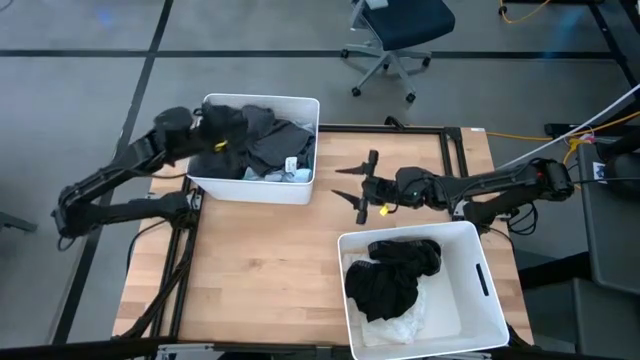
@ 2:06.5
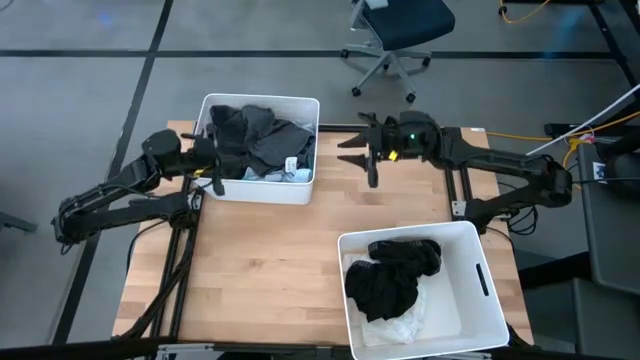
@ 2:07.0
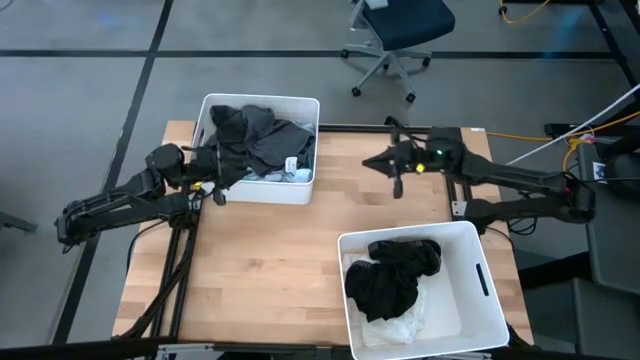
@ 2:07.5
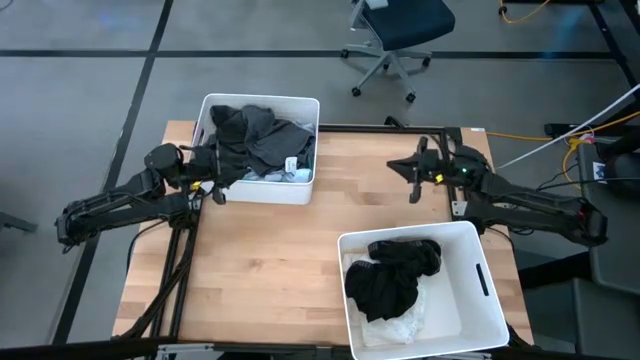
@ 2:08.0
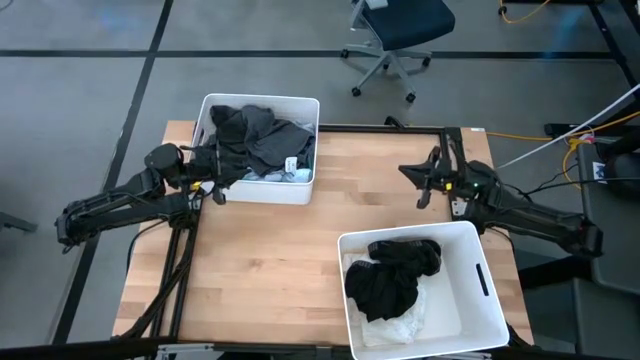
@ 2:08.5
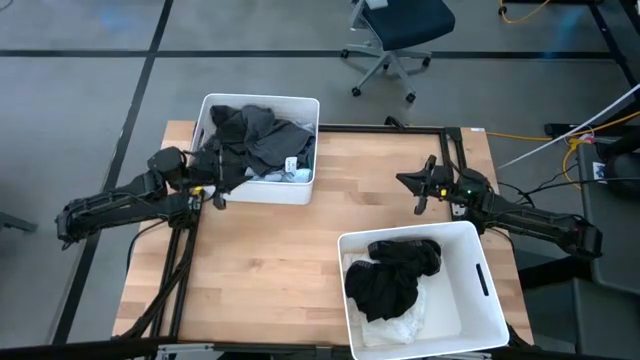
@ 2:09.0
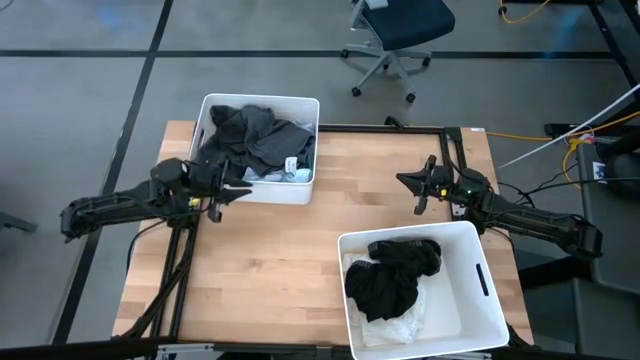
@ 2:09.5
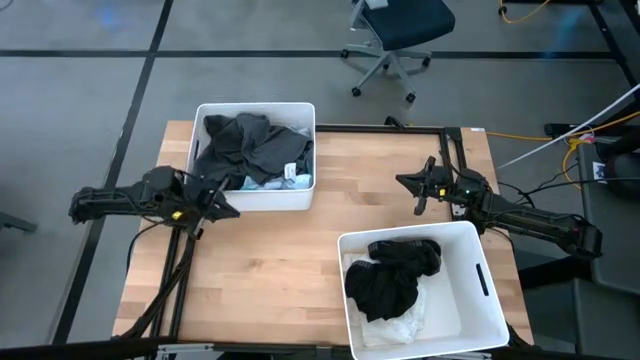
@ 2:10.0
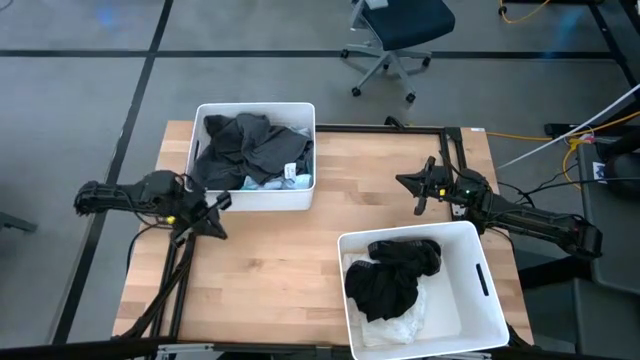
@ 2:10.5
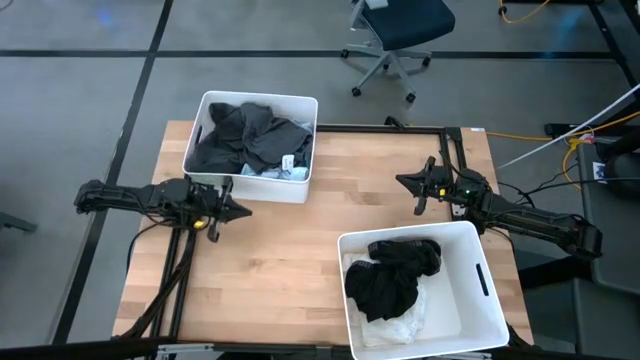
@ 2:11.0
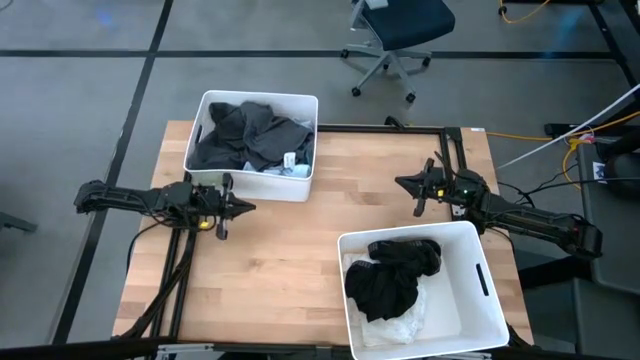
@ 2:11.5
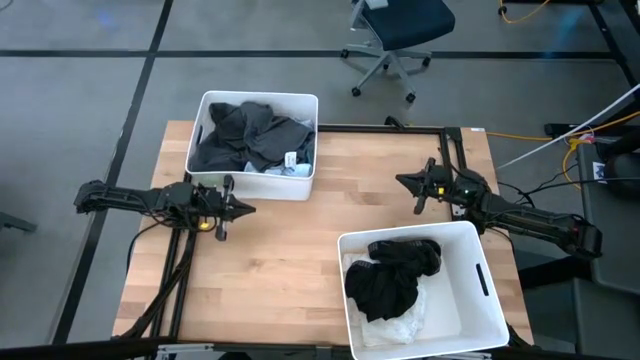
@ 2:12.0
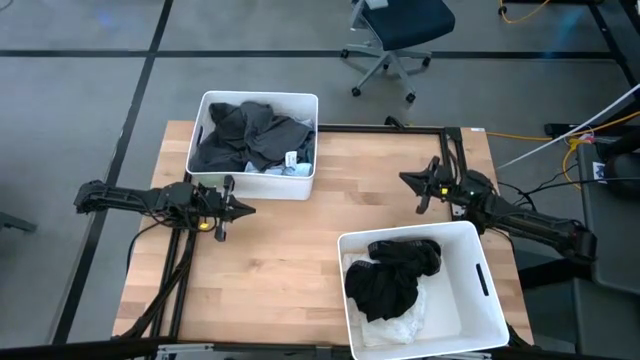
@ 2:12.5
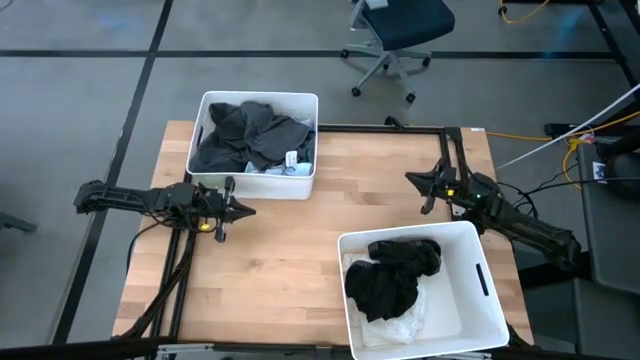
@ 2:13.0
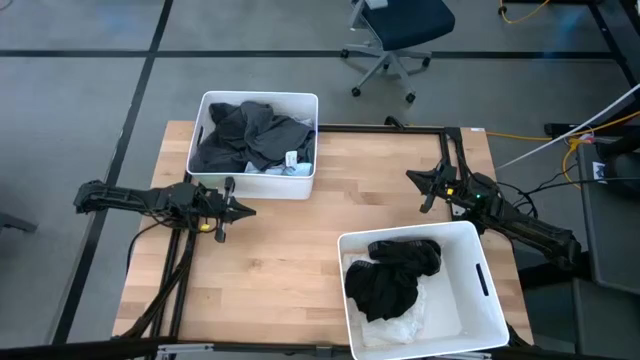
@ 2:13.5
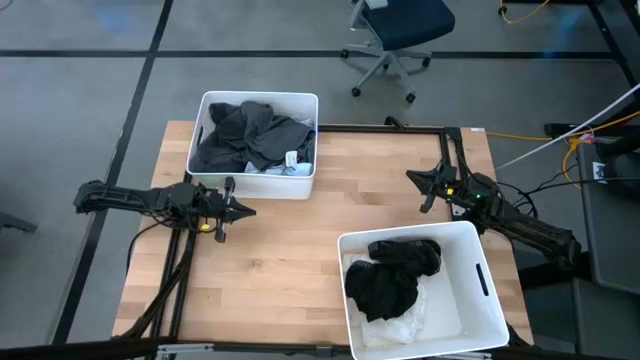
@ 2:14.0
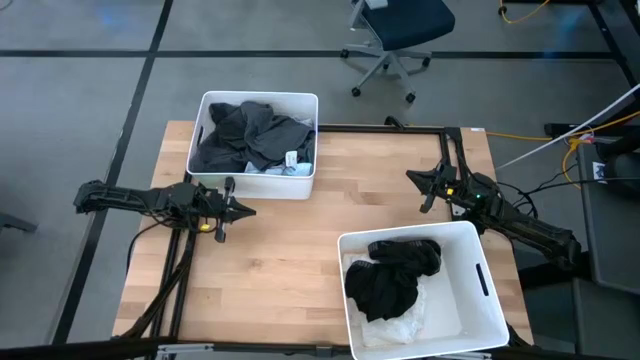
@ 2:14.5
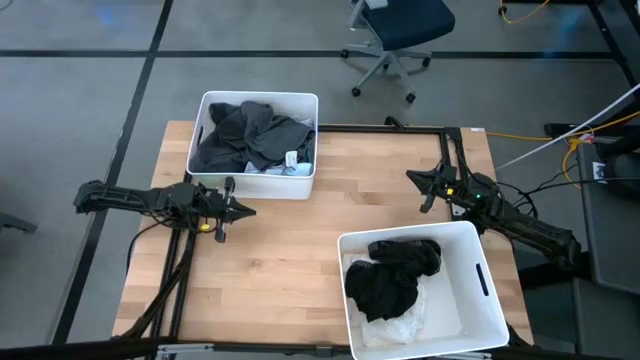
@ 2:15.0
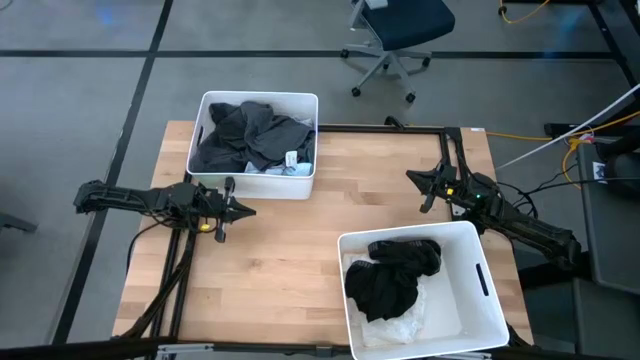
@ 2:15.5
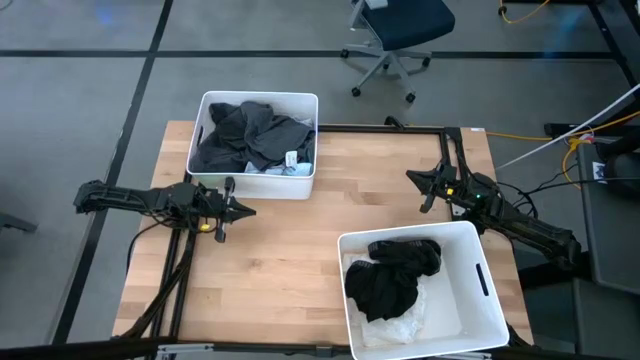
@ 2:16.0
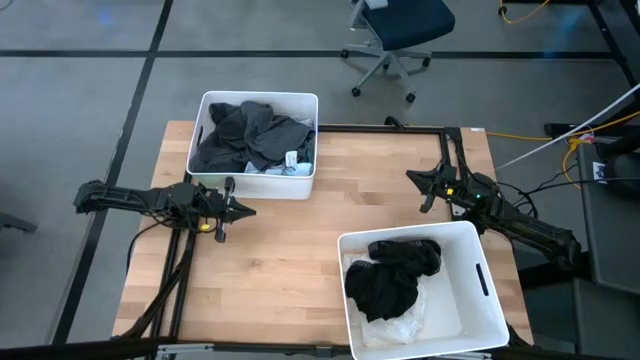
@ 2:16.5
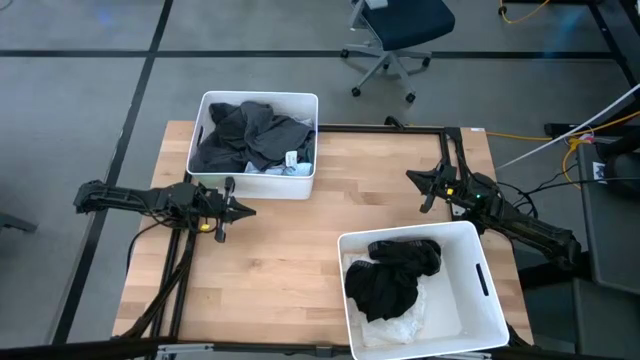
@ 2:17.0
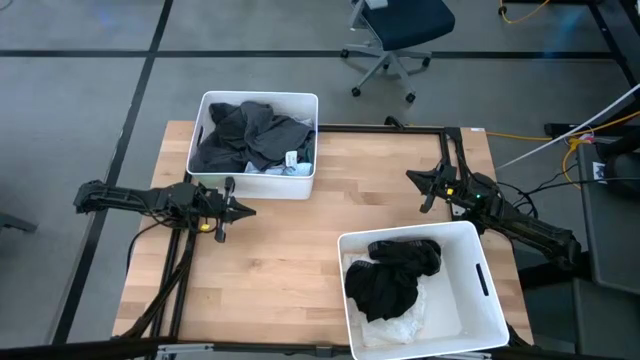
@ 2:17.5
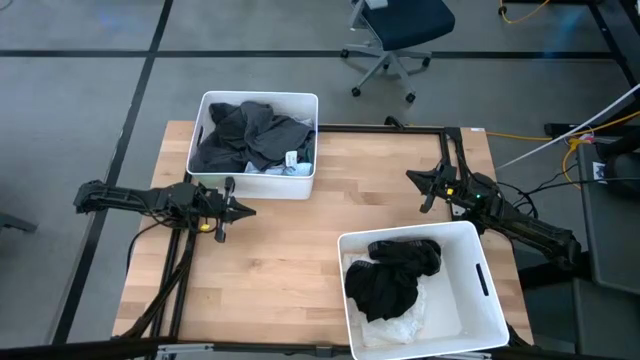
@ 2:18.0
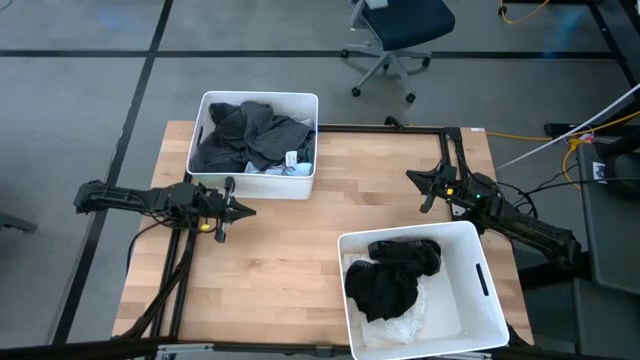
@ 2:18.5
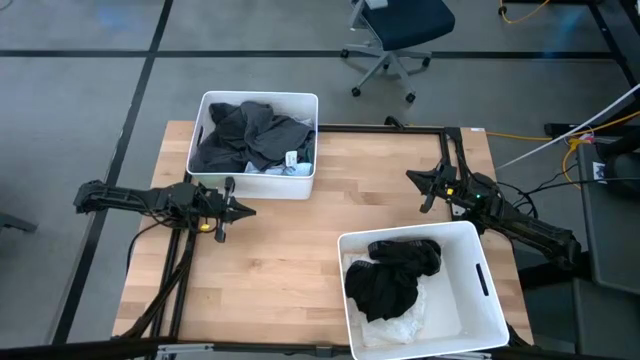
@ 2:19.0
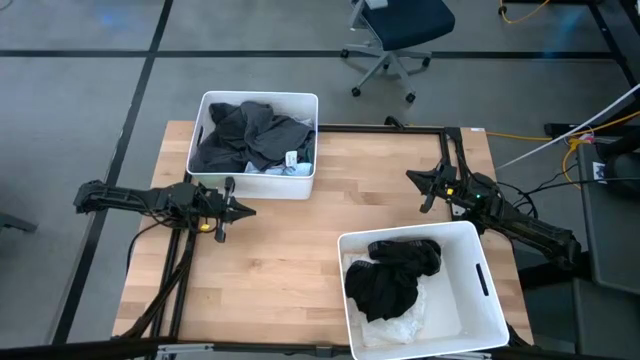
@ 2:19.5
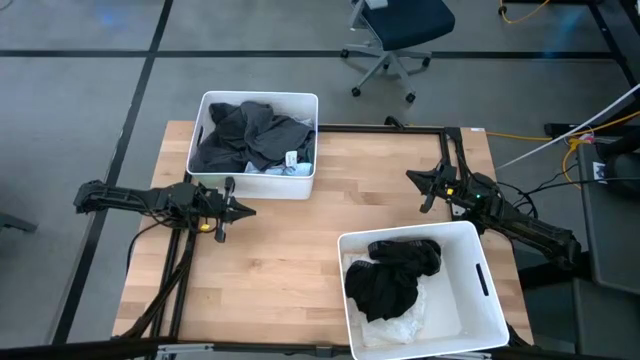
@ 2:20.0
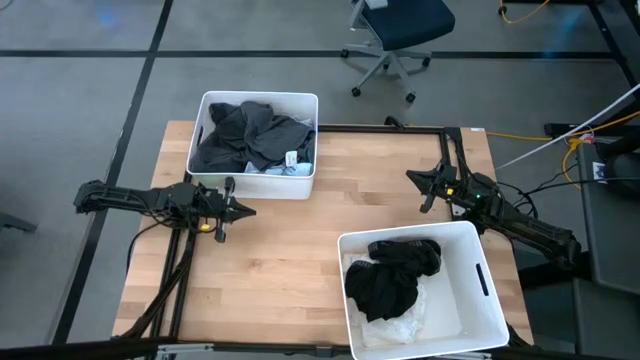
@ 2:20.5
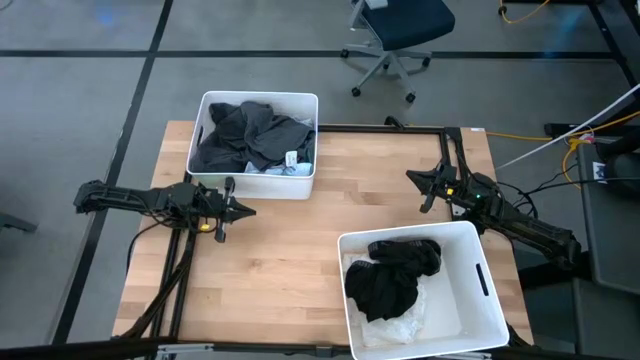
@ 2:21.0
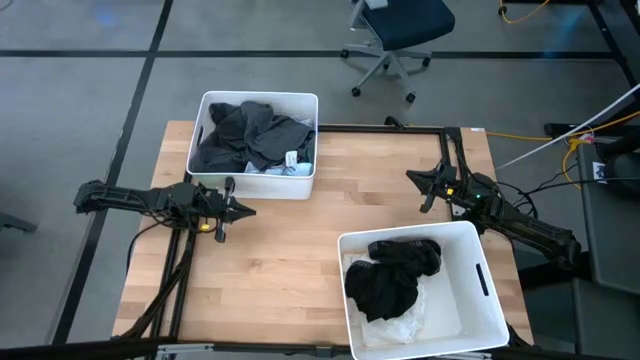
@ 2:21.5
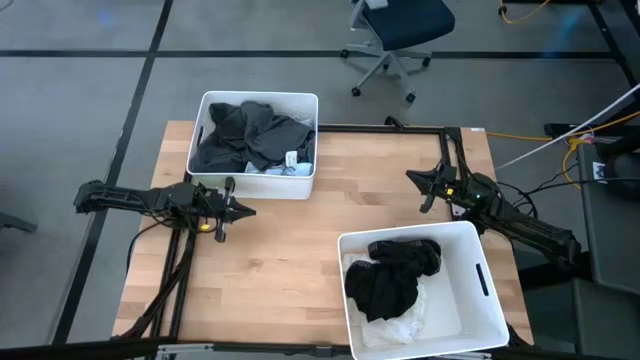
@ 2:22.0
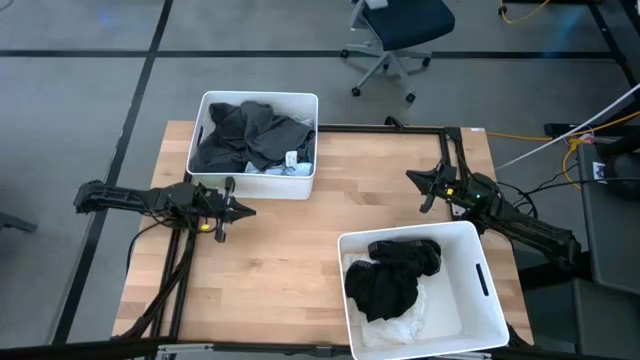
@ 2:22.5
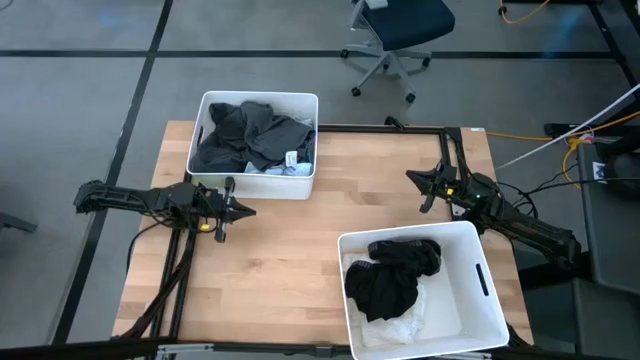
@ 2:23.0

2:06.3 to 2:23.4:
Task: Sort clothes
Return to Home Position

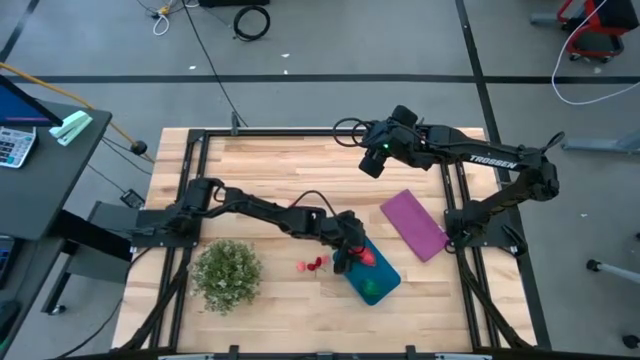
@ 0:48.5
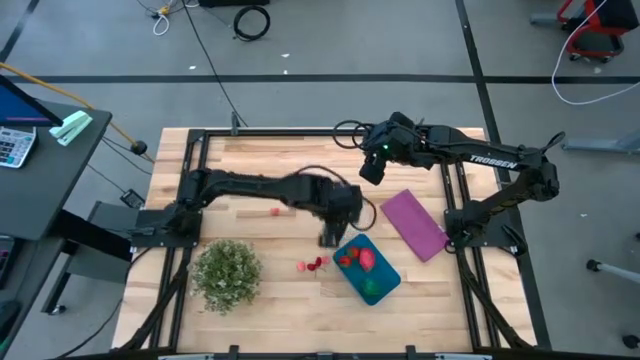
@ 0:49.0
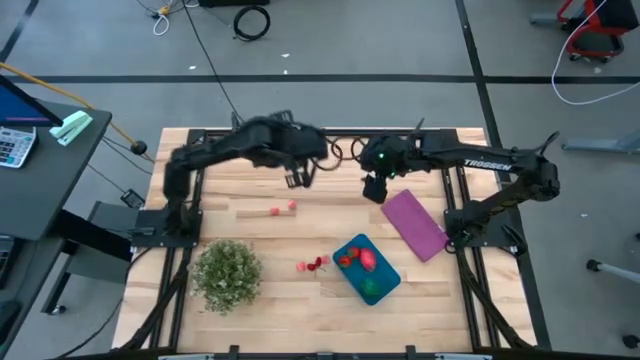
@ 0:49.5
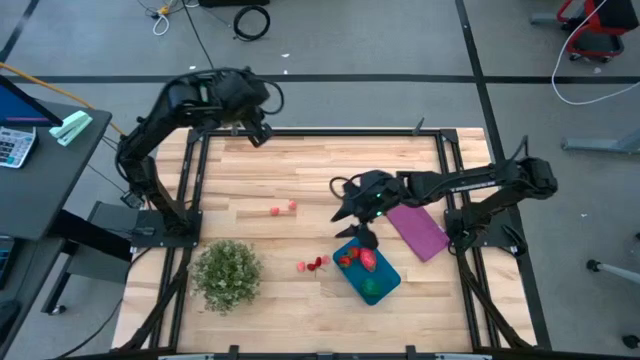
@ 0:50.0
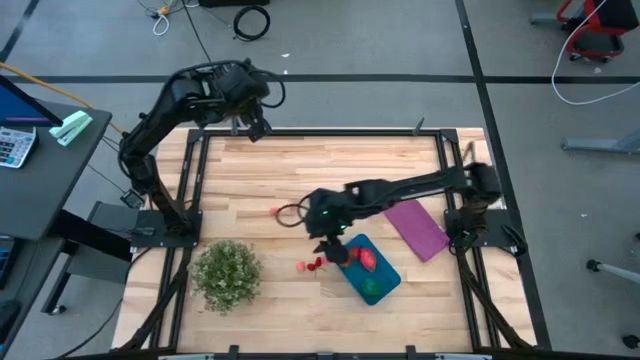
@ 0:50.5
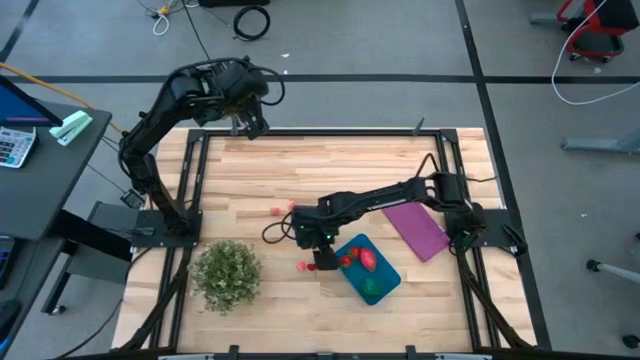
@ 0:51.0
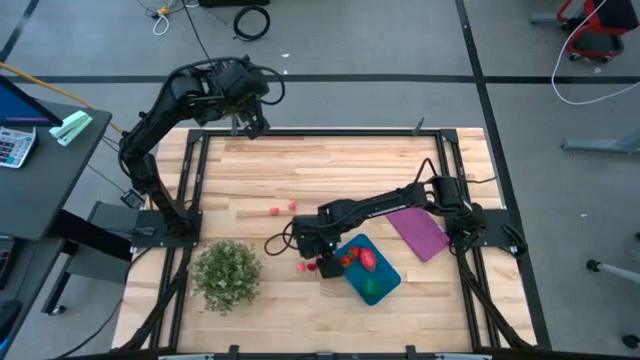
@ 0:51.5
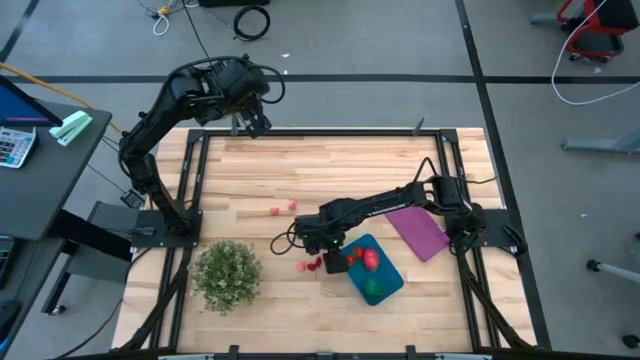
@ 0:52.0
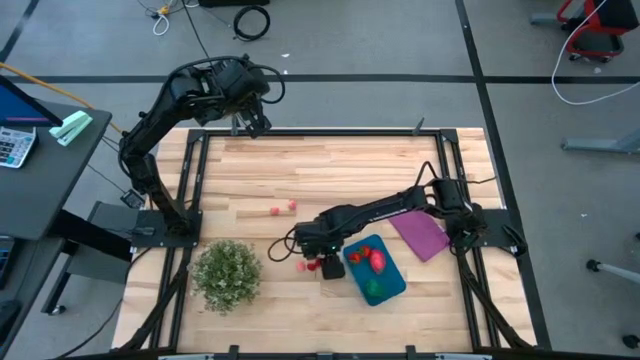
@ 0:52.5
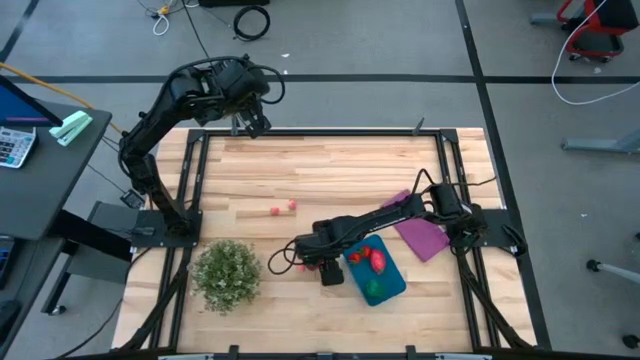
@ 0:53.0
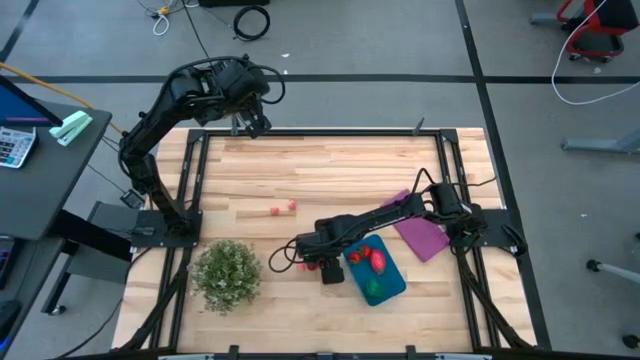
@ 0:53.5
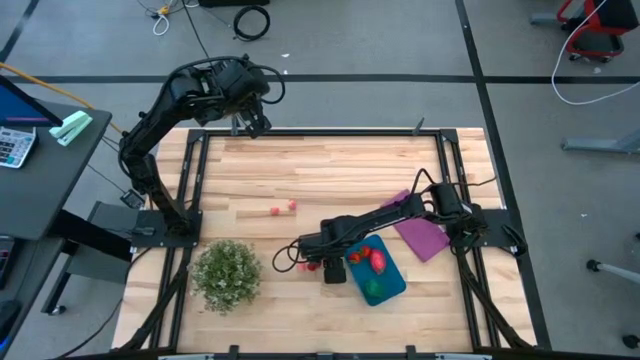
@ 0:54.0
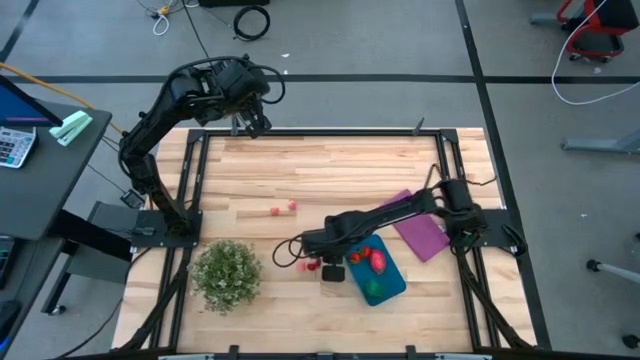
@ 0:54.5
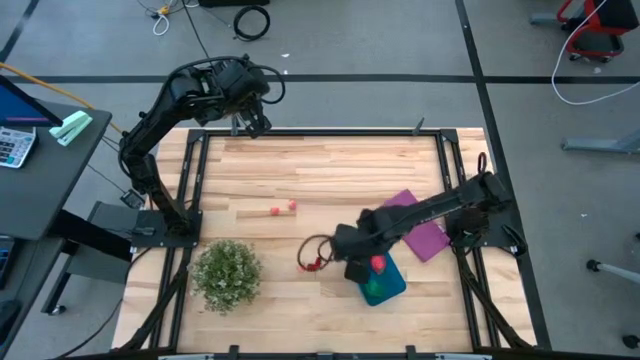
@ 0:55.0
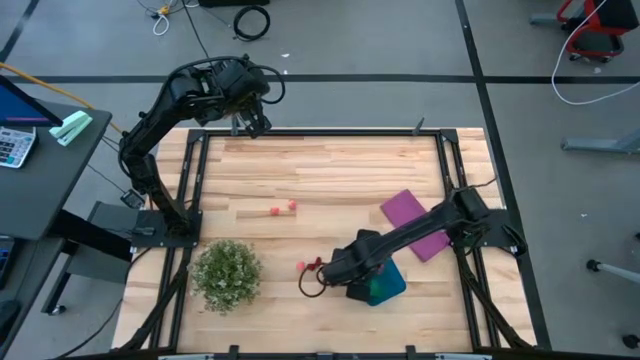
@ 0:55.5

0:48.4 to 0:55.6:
Task: Pick and placing Produce into tupperware
Put the pink peach into the blue bin
